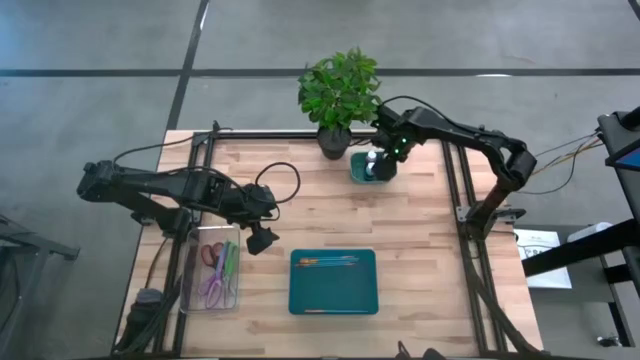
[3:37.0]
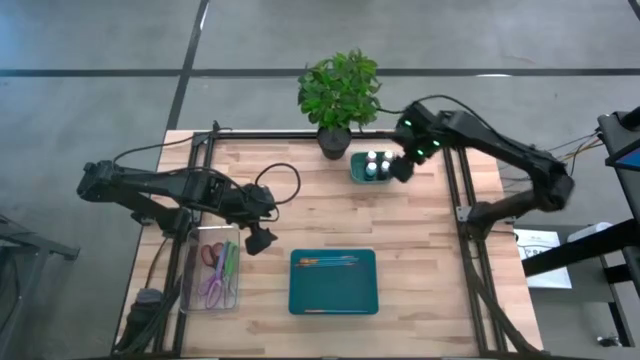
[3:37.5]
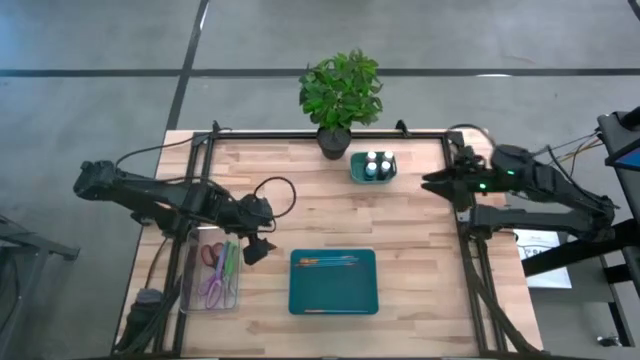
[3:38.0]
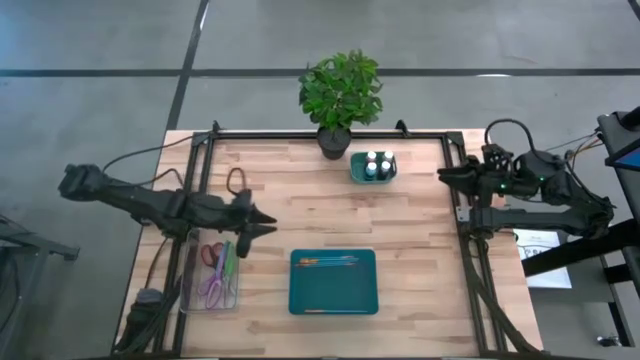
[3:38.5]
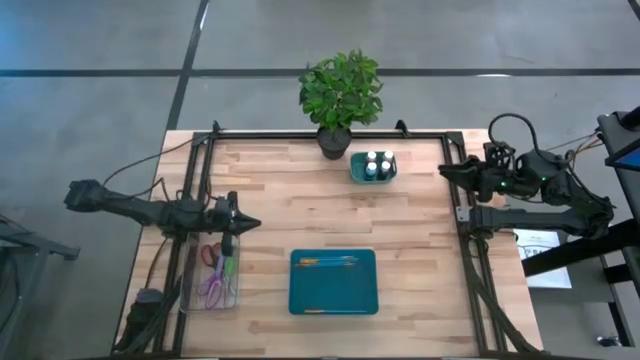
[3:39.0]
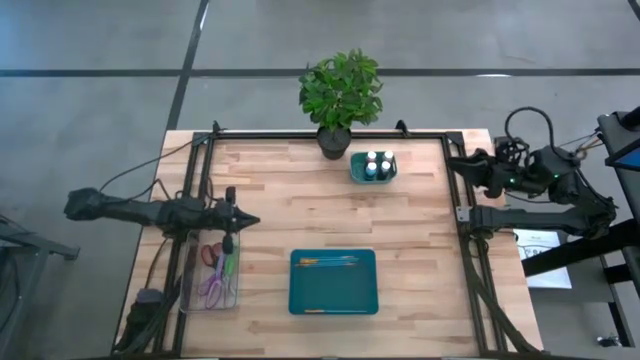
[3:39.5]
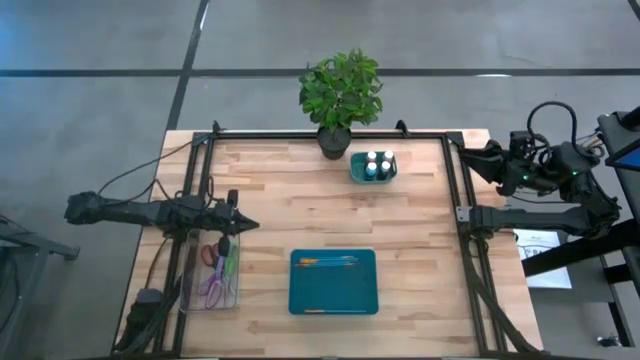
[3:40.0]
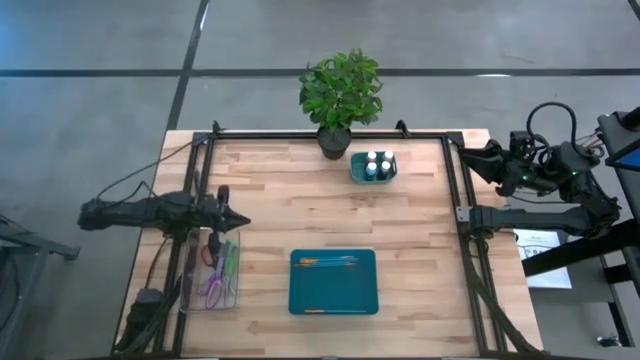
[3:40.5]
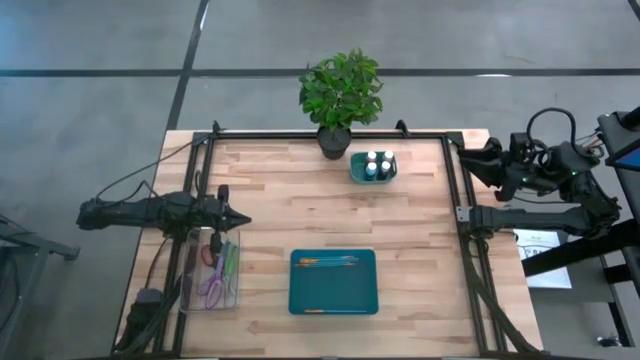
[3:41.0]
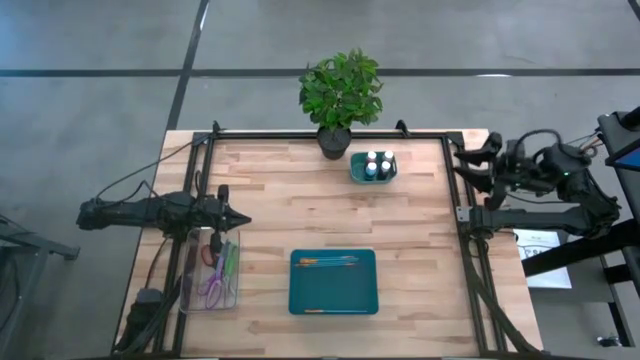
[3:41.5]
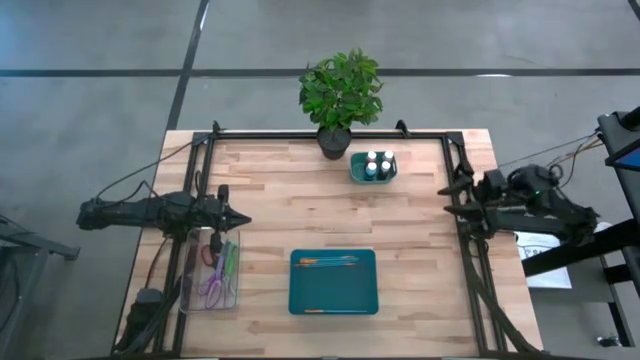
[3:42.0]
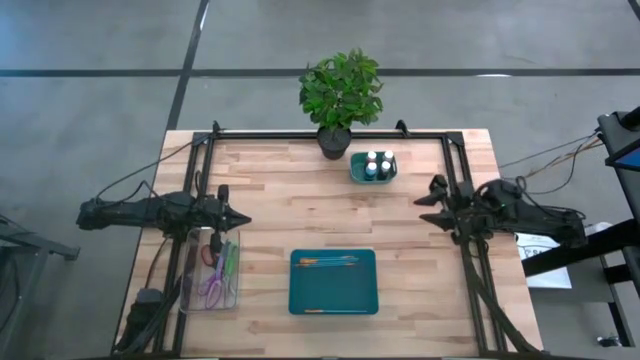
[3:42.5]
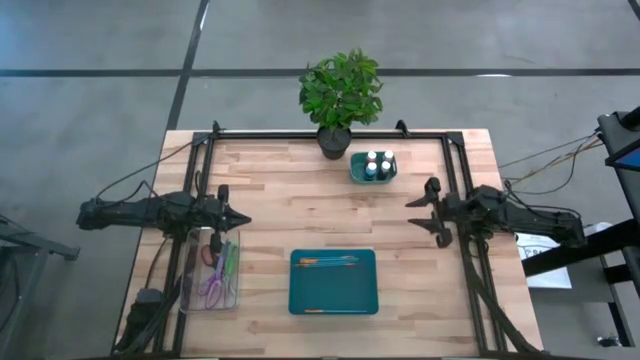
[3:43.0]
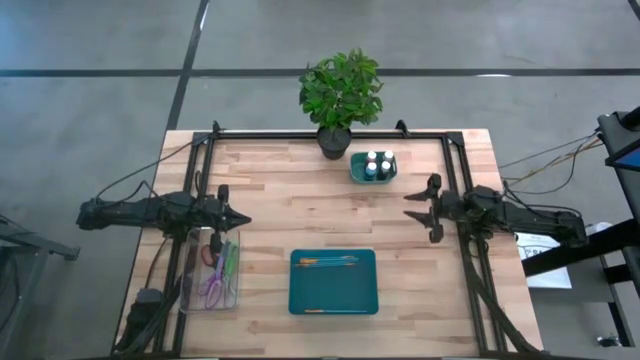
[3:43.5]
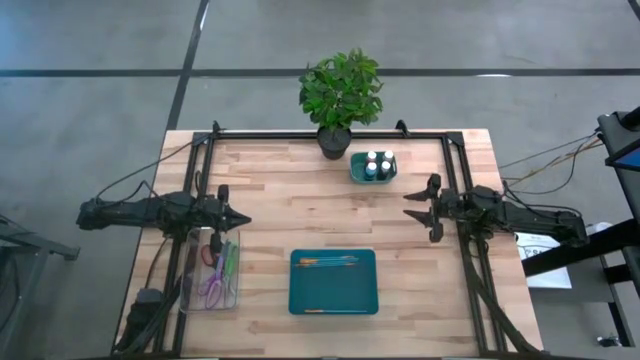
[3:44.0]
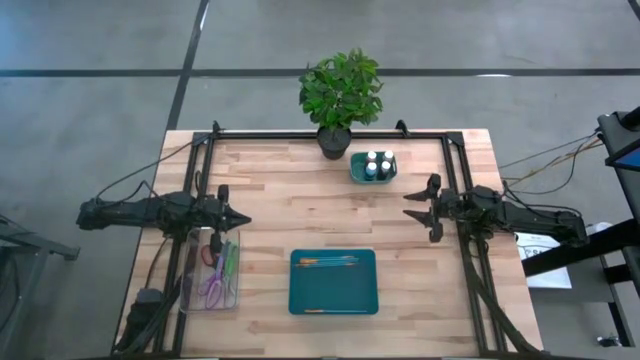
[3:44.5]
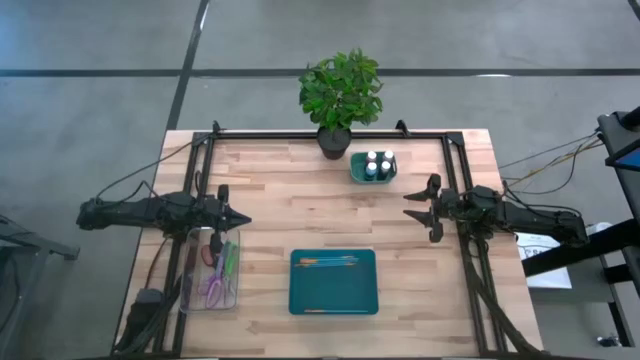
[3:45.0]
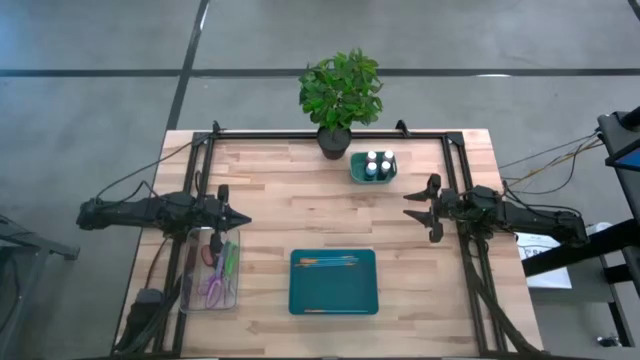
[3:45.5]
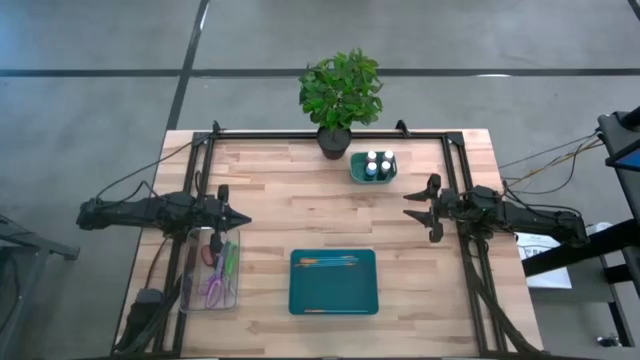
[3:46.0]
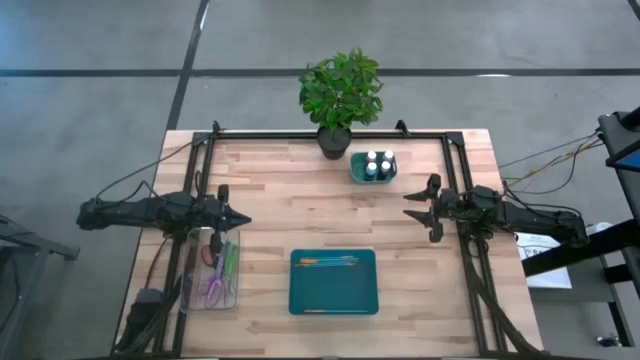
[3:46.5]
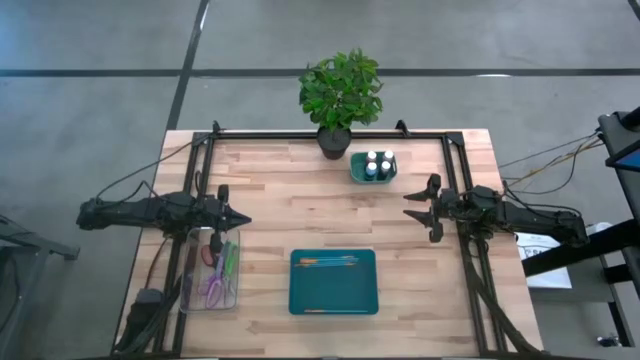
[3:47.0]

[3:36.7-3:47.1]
Task: Pick & Place Paint Supplies
Return To Home Position

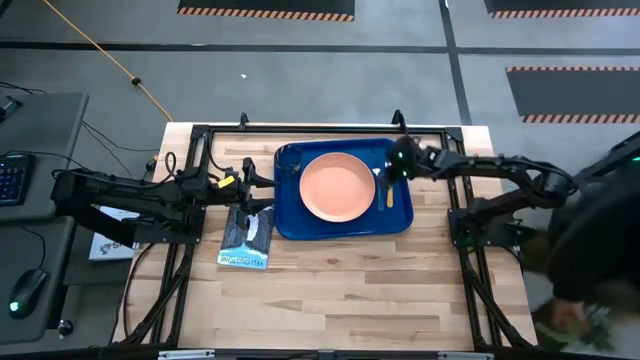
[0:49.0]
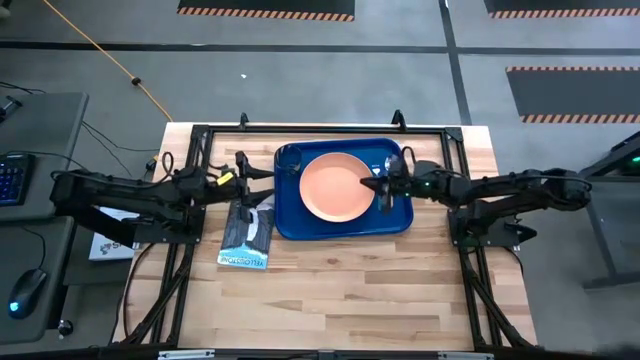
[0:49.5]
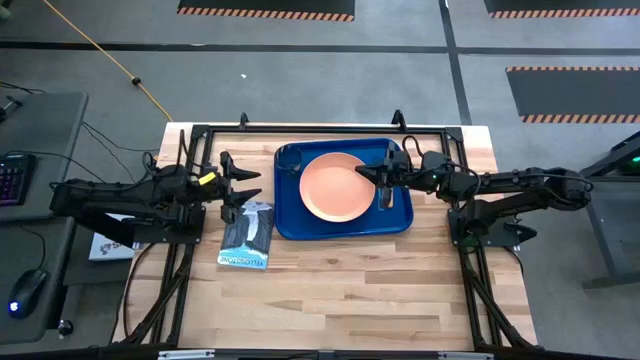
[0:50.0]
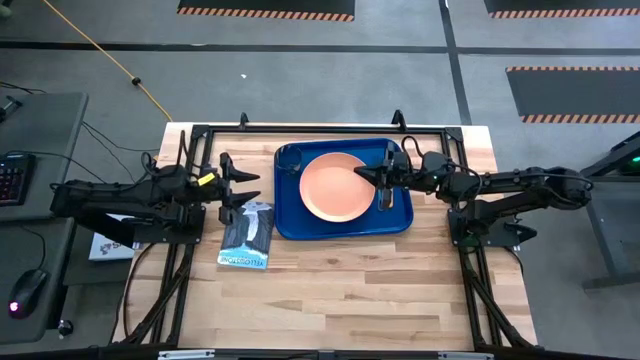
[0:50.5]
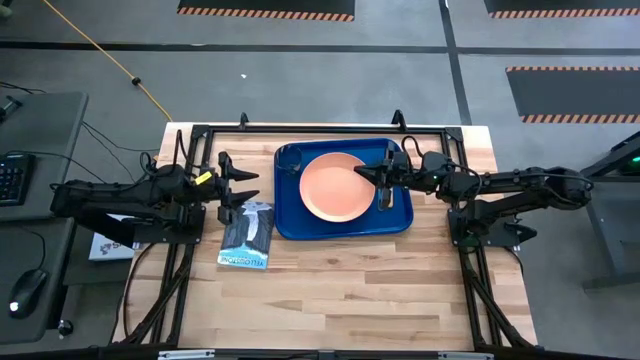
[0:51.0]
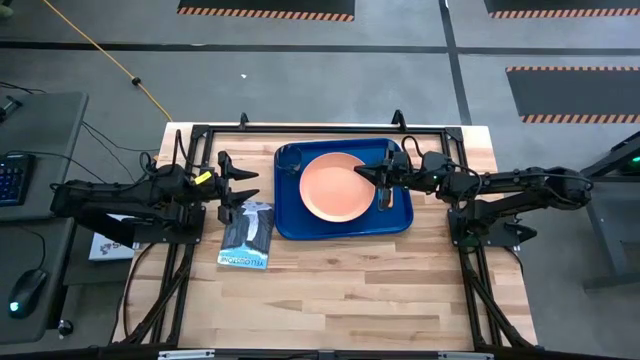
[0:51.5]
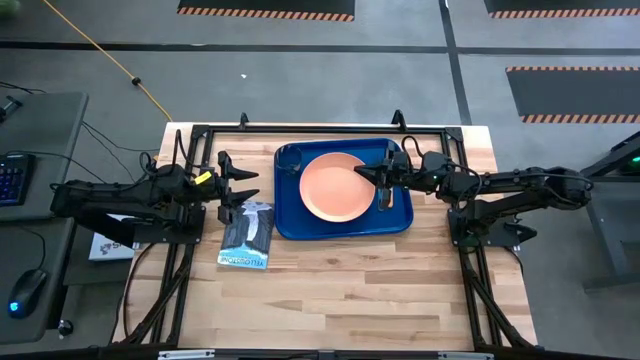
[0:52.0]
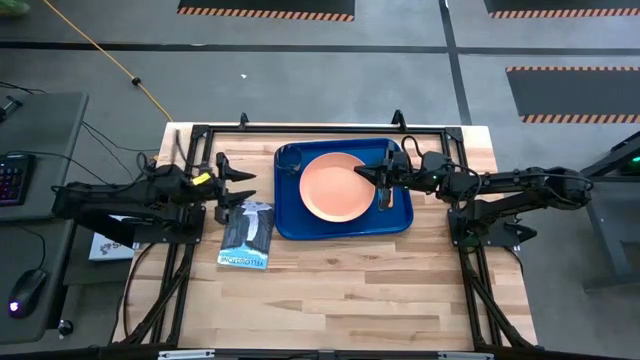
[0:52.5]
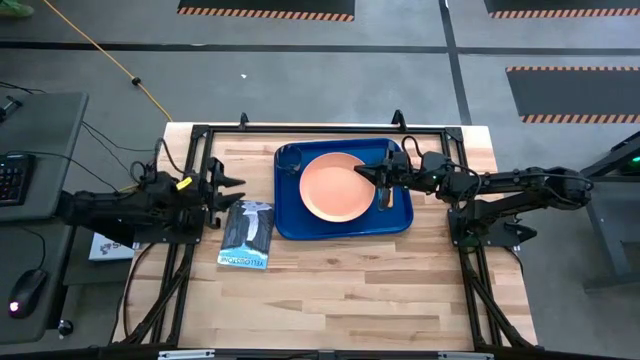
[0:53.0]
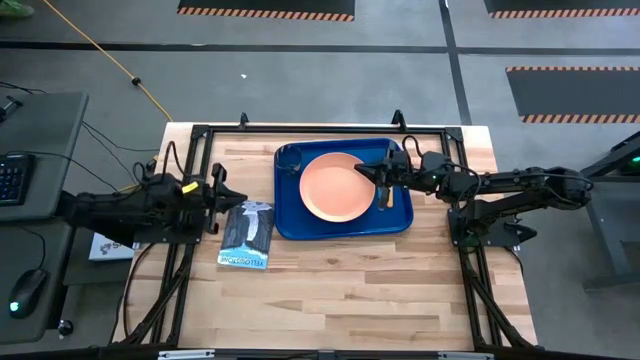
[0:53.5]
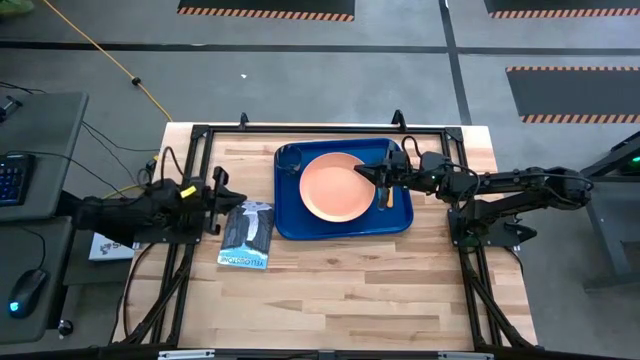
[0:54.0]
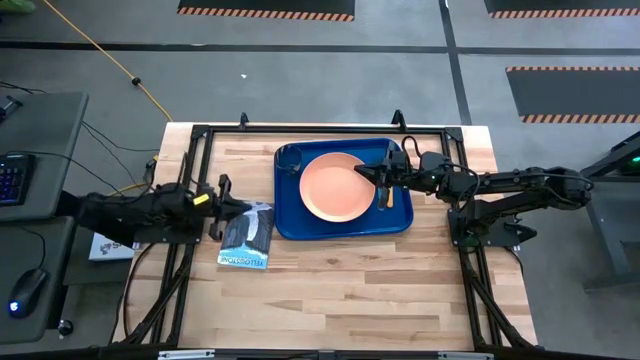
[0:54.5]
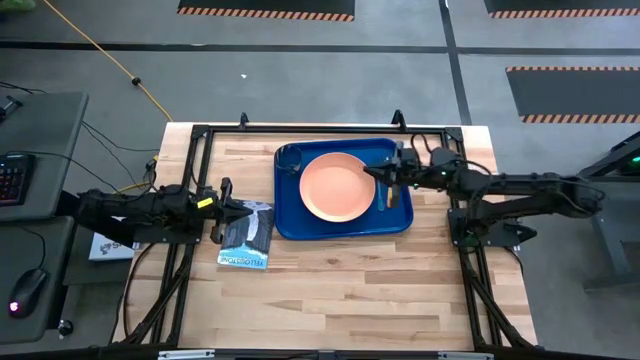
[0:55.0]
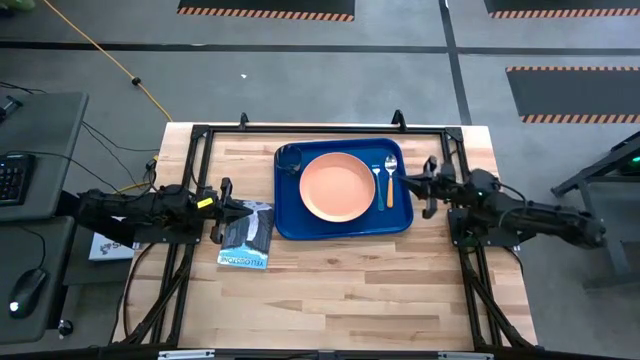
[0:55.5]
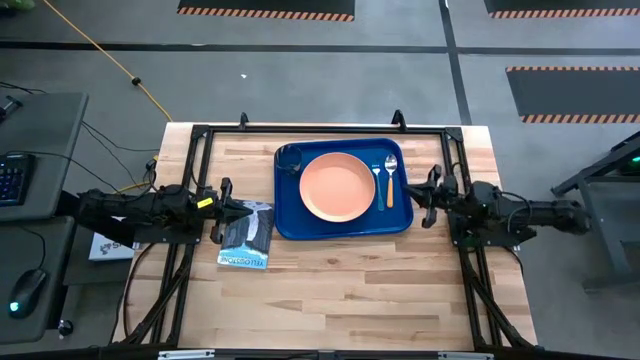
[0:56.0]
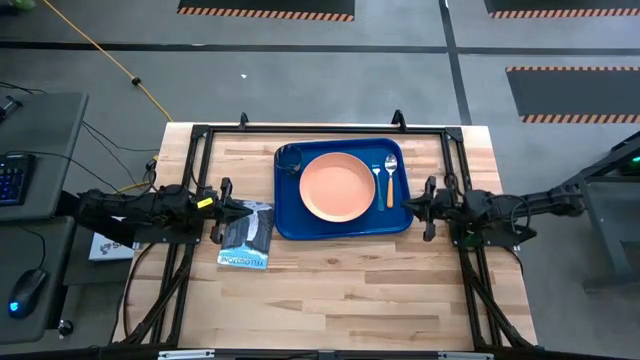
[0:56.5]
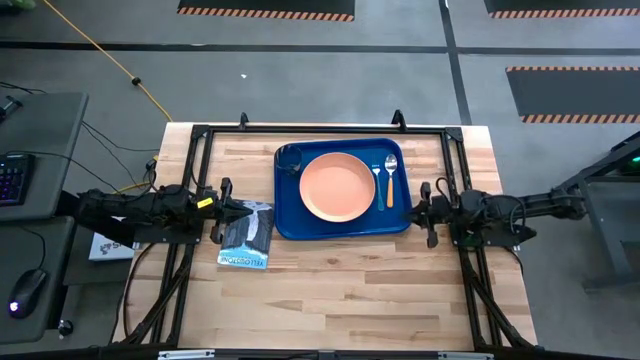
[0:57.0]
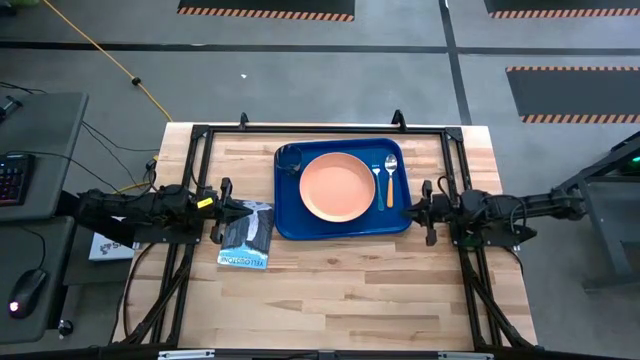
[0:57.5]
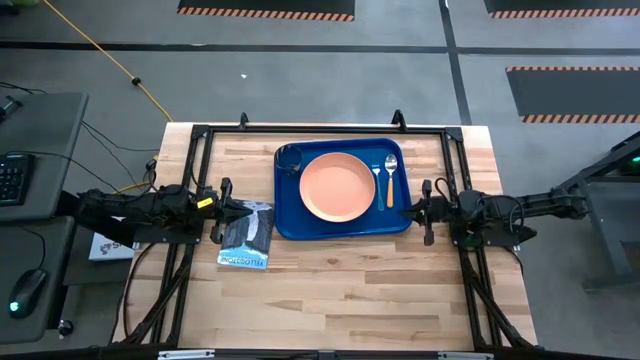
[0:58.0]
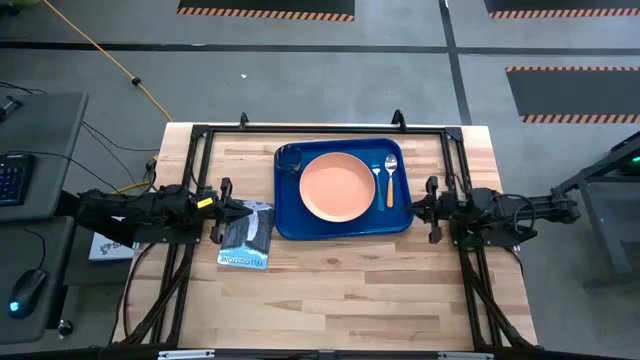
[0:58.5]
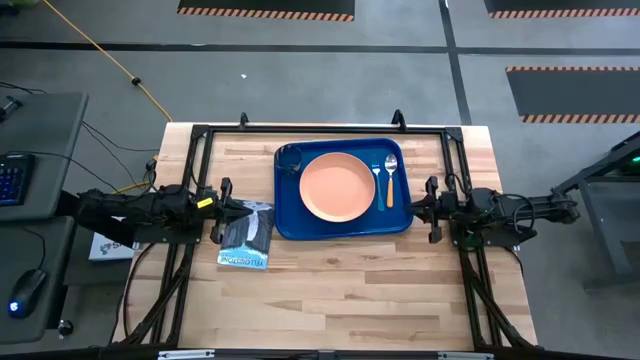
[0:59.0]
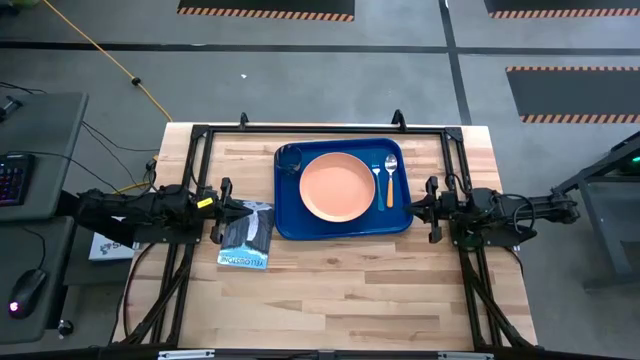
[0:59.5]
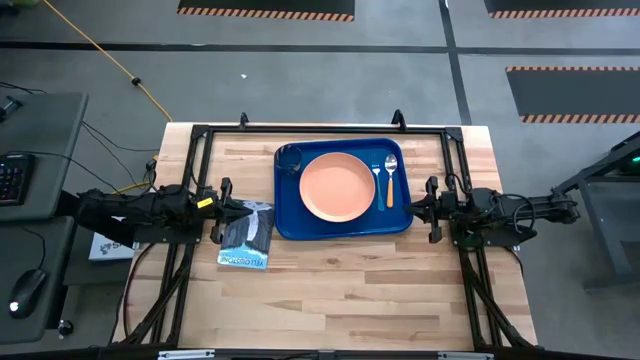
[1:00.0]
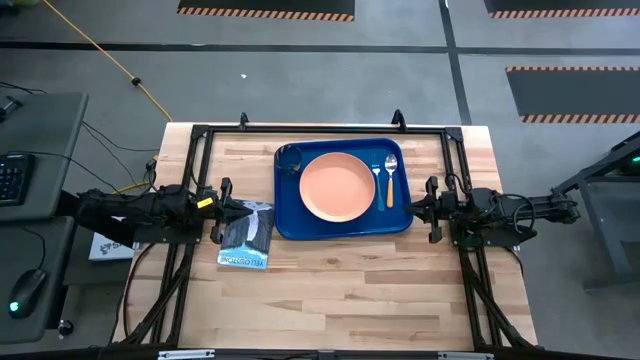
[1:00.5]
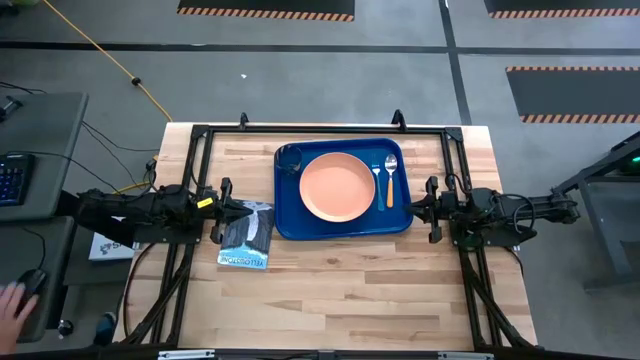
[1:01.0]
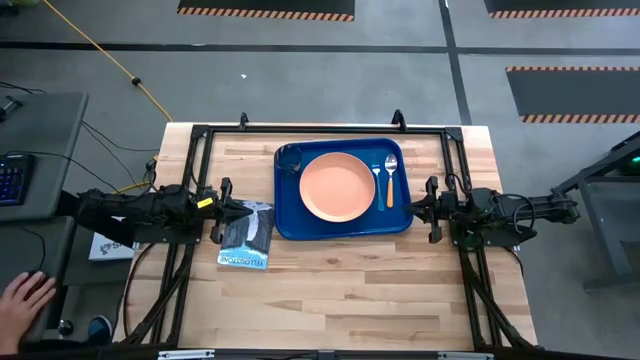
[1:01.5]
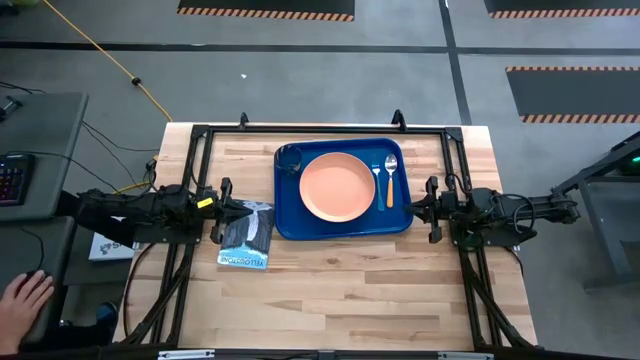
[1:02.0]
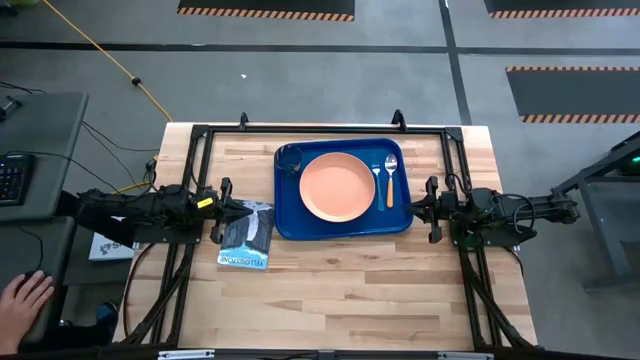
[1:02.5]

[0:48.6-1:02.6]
Task: Pick and place plate/cup/fork/spoon on tray
Return to Home Position
